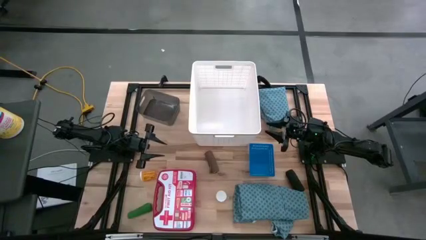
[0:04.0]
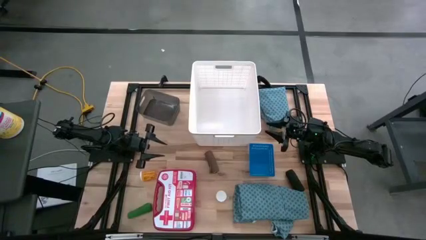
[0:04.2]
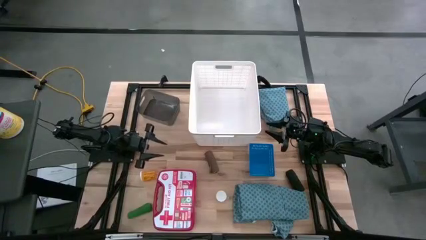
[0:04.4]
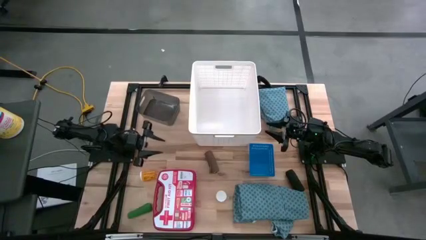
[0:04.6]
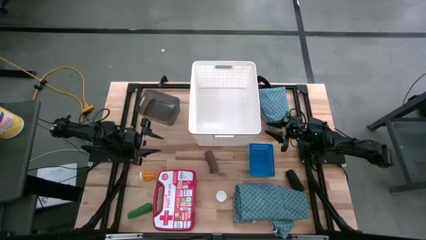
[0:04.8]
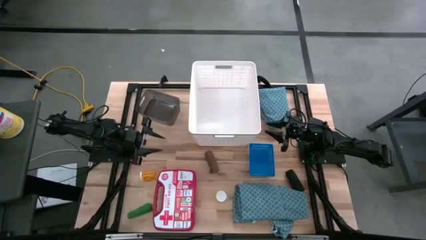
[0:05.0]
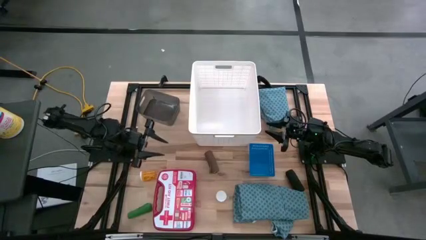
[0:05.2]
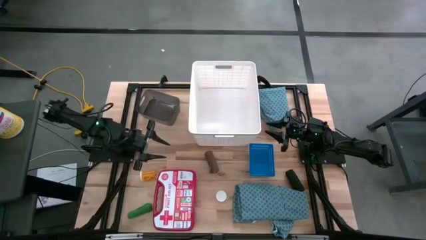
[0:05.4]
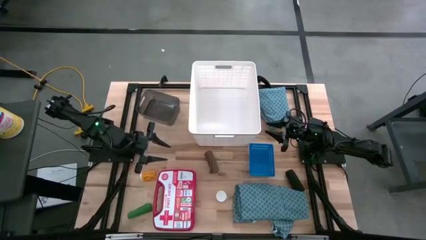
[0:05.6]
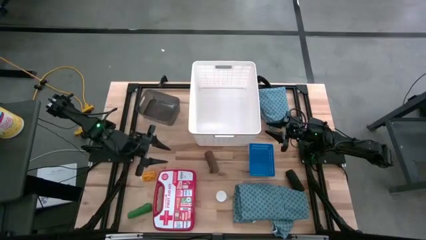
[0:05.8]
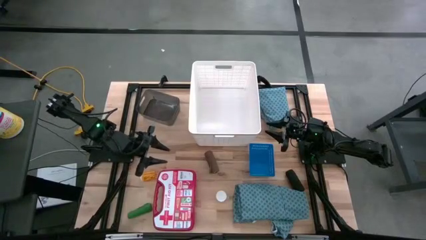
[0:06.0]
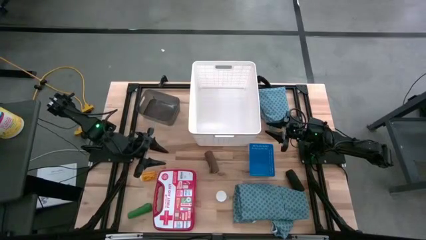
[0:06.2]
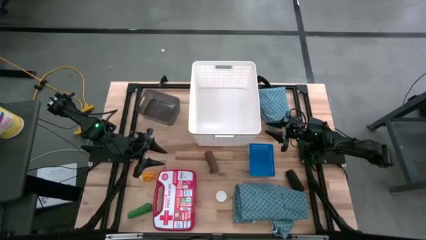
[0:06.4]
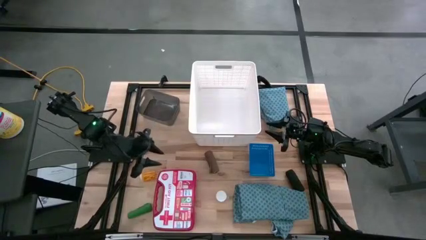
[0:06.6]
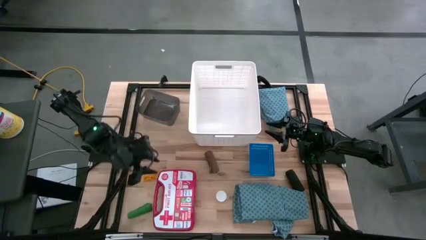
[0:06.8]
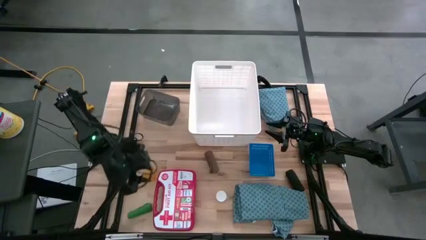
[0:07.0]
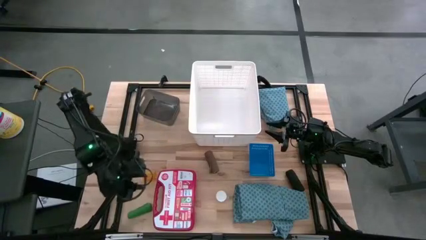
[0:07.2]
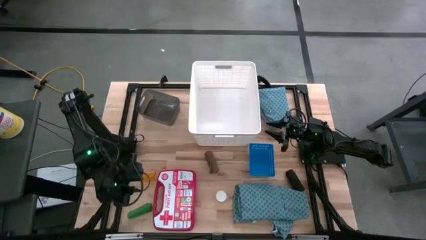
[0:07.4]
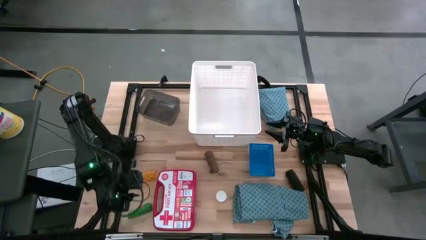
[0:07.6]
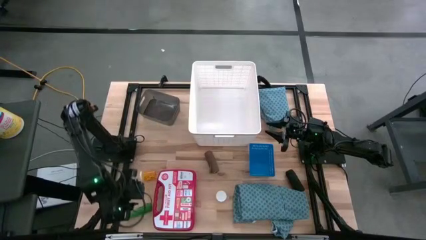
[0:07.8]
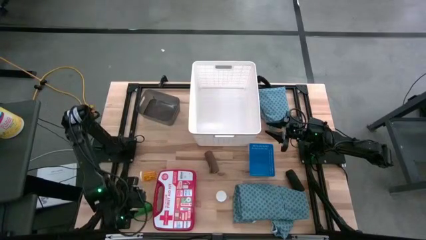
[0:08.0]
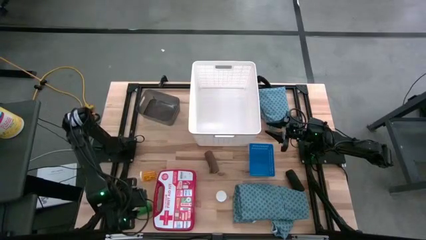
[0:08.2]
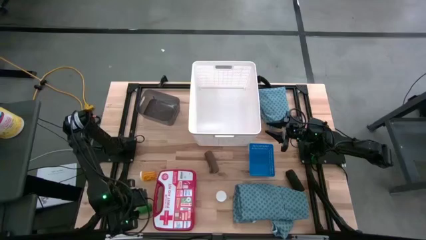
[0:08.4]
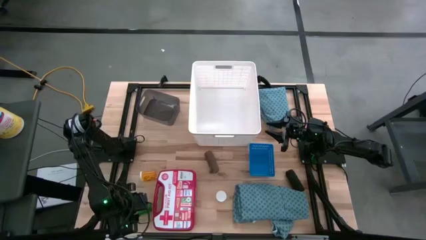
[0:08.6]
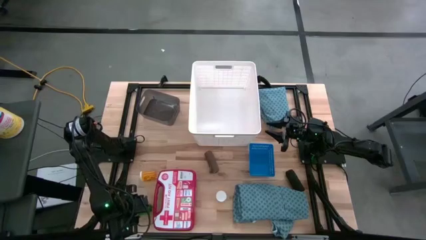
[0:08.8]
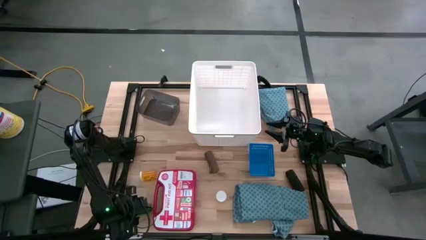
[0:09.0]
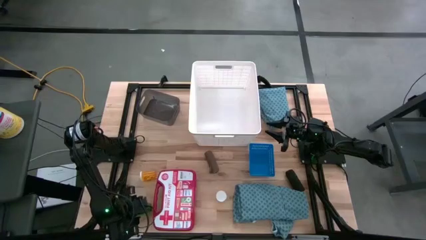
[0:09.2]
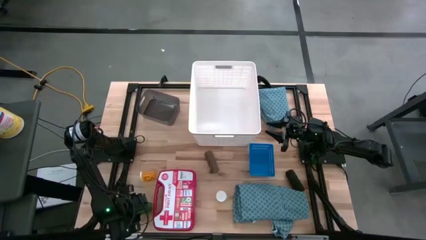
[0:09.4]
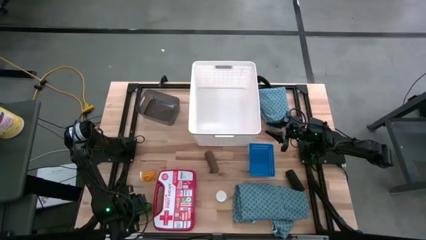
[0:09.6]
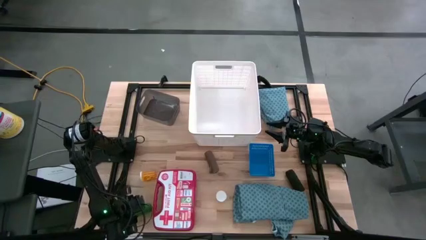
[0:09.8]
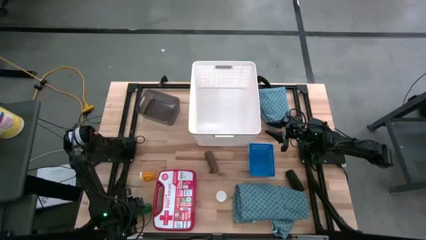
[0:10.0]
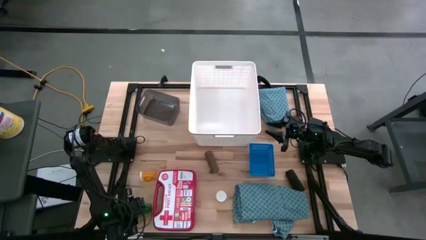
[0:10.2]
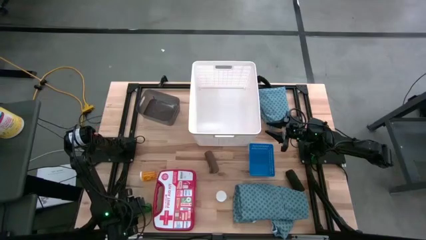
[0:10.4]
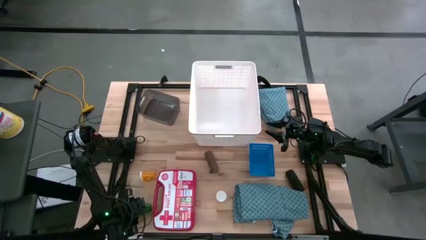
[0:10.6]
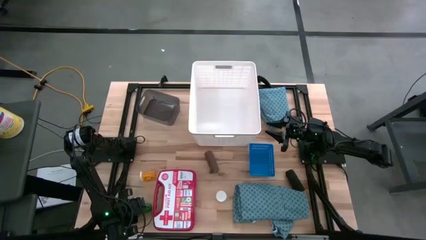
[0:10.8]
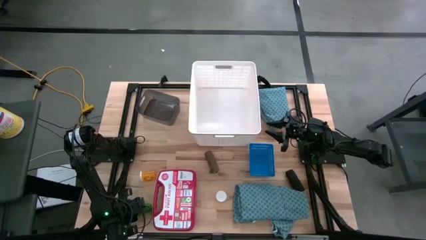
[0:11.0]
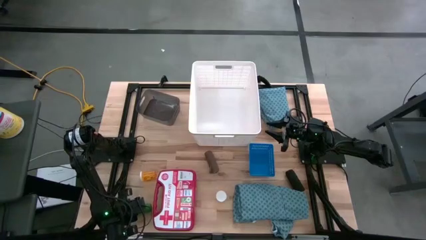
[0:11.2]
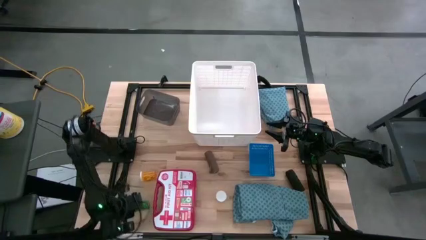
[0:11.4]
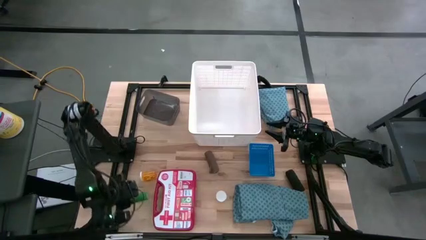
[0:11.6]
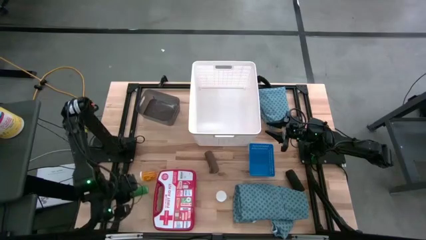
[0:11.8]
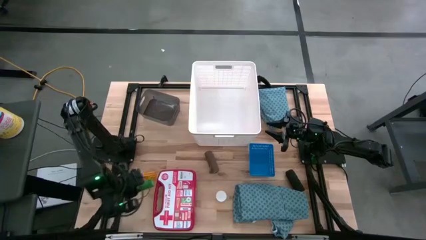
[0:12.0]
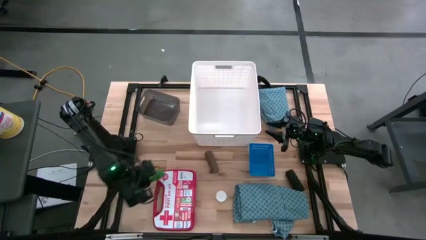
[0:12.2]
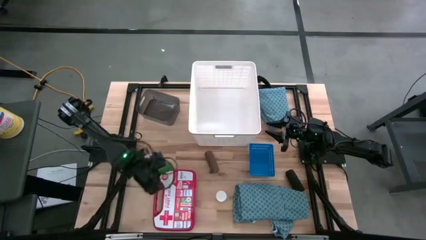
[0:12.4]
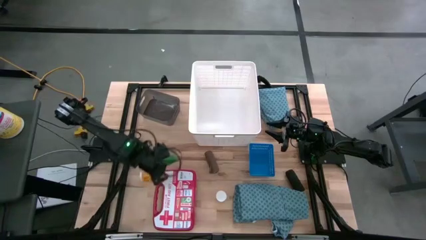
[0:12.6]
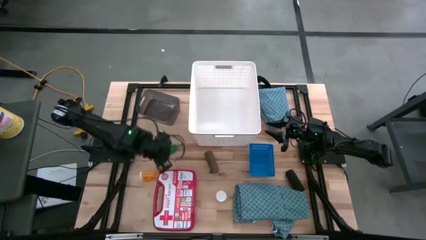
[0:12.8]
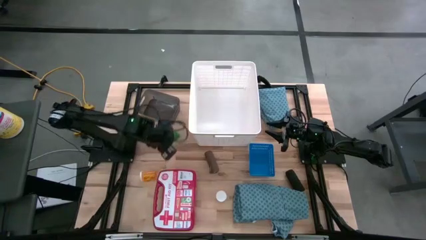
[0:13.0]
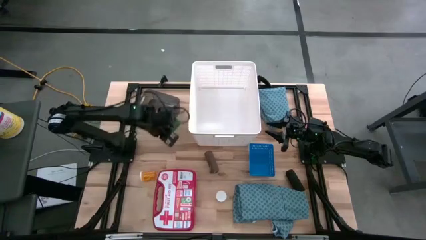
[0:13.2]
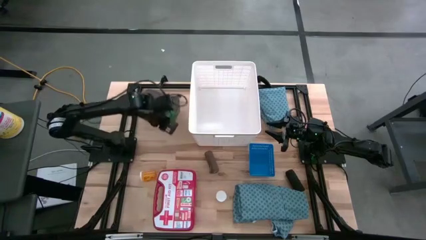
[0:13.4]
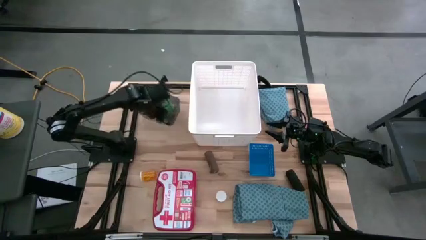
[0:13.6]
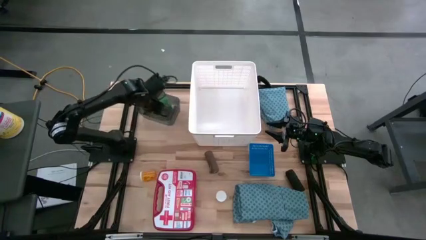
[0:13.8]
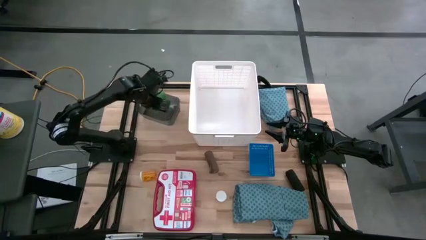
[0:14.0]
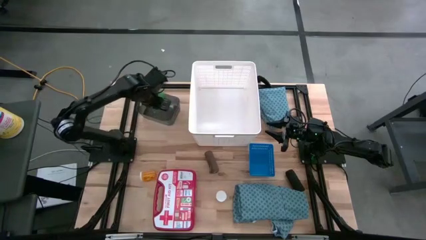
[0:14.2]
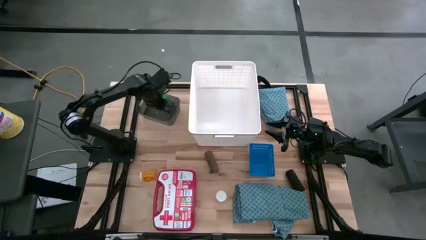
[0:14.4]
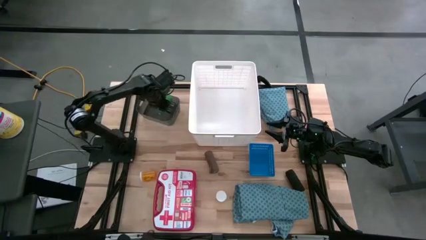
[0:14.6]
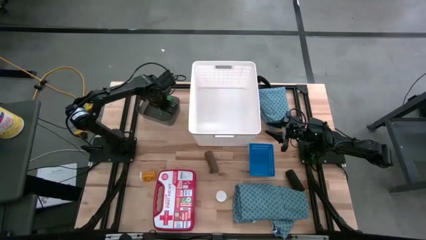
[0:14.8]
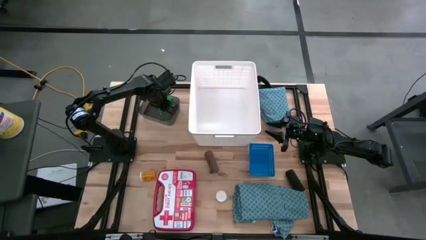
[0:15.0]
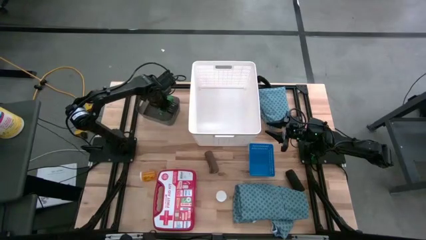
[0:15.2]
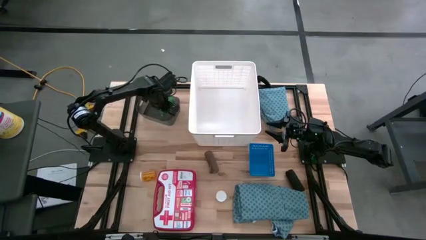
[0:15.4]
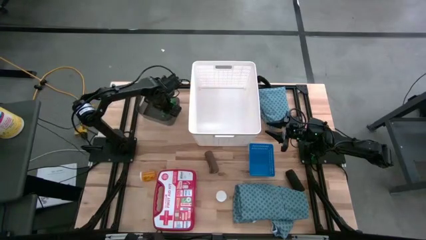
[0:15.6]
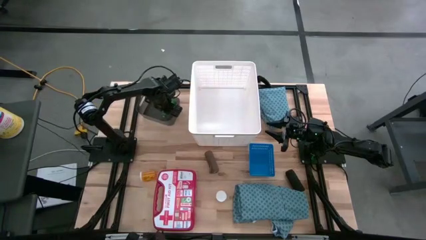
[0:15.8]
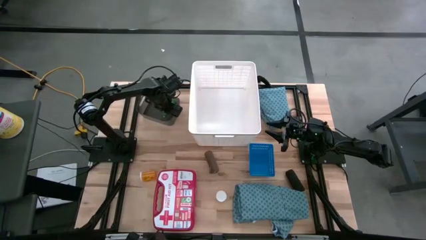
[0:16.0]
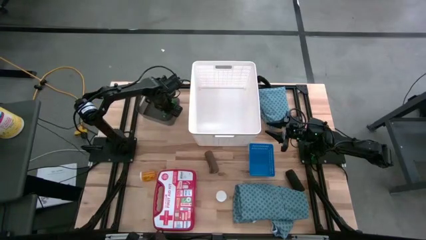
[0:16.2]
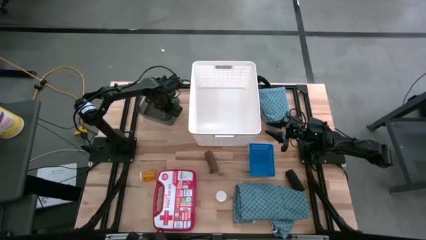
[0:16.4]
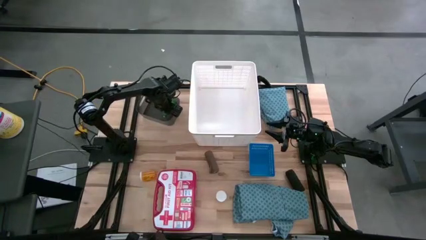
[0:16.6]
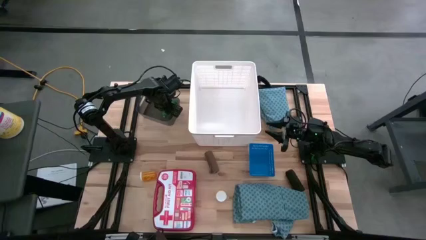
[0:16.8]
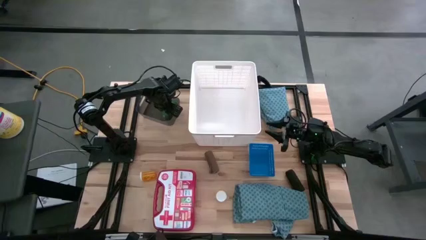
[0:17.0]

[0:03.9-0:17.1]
Task: Pick & place medical supplies in basket/bin
Put the green bandage into the black bin

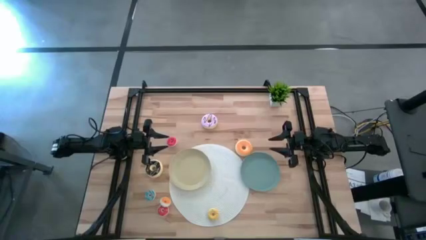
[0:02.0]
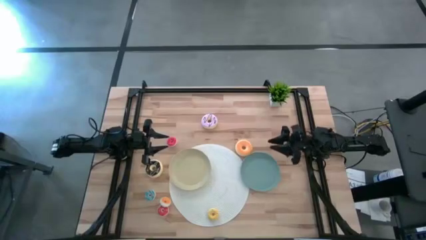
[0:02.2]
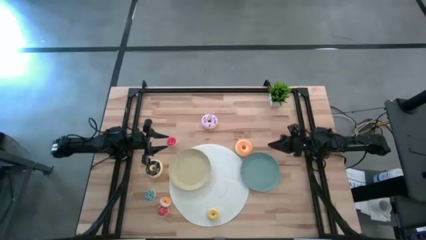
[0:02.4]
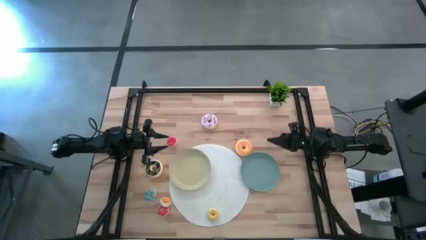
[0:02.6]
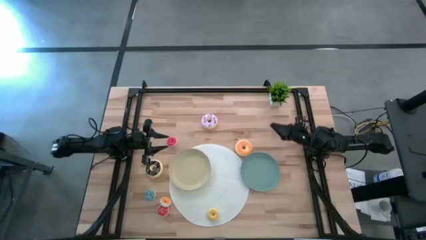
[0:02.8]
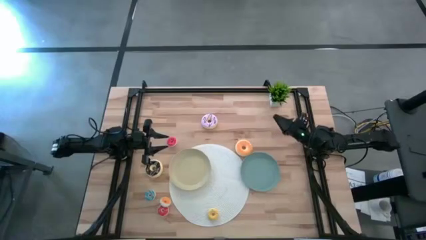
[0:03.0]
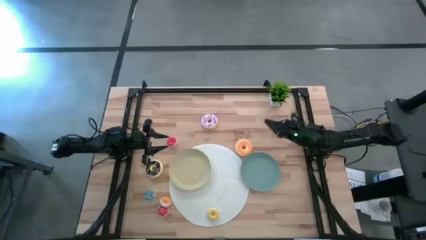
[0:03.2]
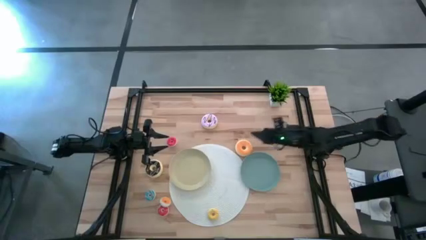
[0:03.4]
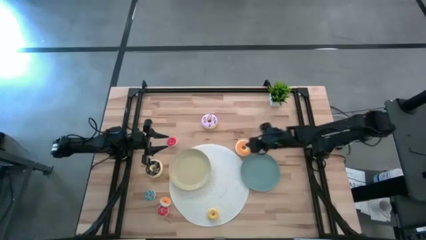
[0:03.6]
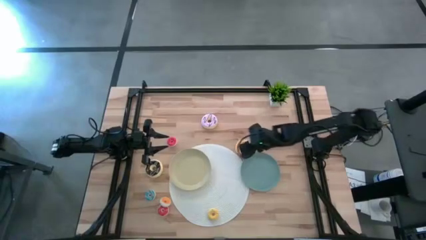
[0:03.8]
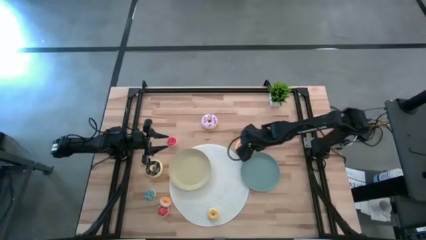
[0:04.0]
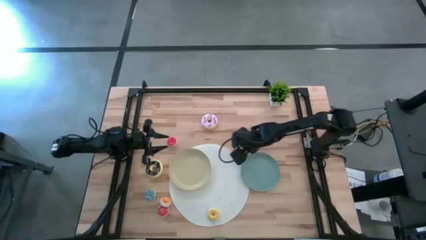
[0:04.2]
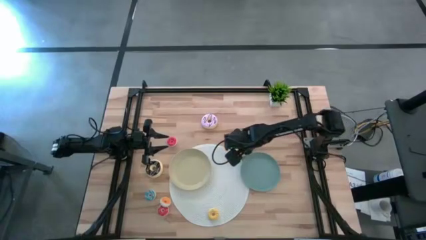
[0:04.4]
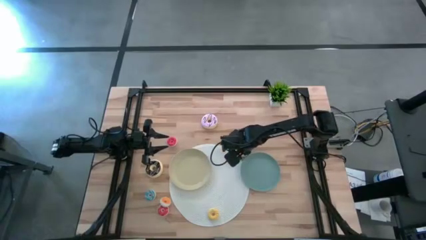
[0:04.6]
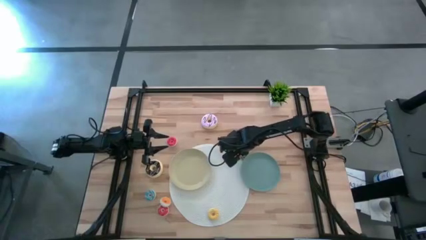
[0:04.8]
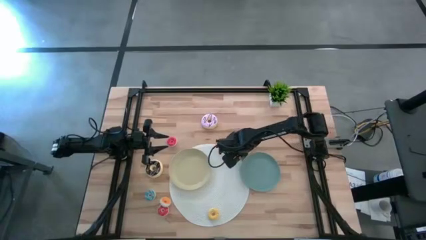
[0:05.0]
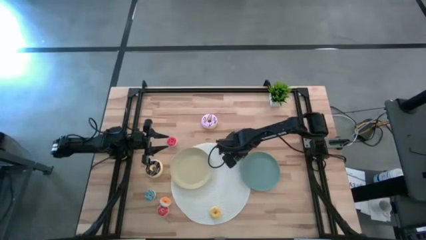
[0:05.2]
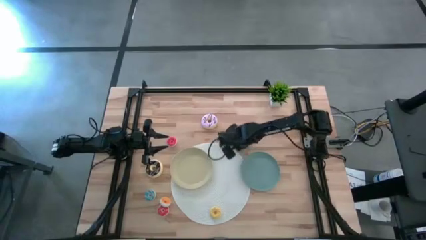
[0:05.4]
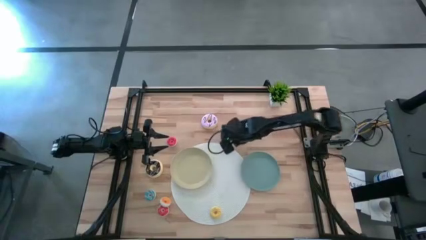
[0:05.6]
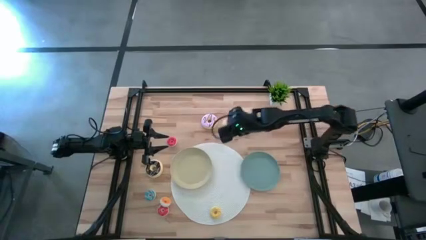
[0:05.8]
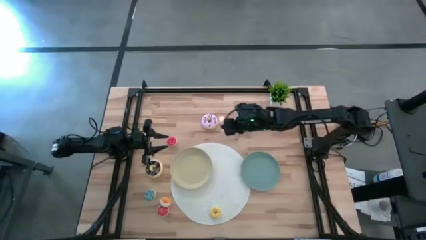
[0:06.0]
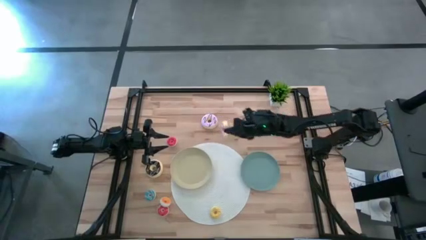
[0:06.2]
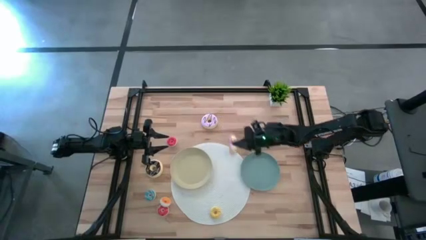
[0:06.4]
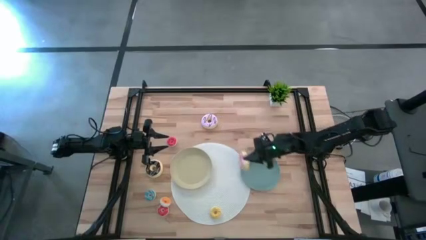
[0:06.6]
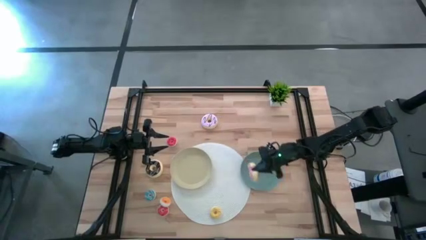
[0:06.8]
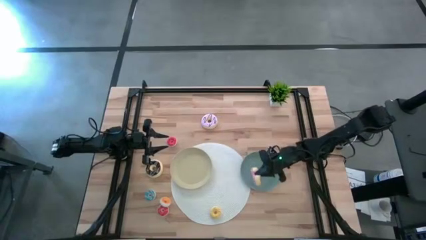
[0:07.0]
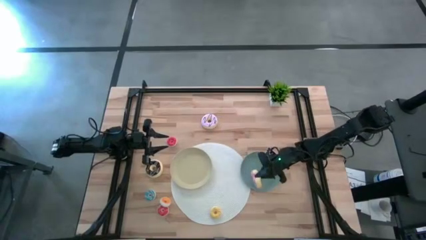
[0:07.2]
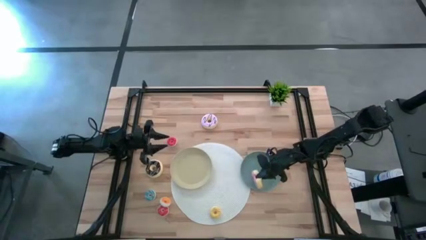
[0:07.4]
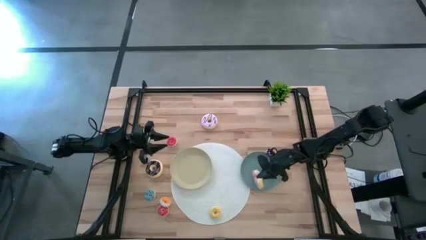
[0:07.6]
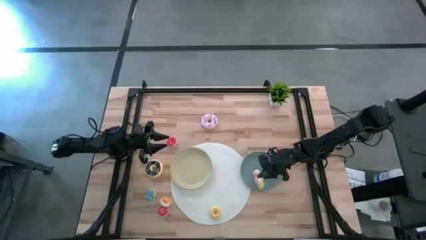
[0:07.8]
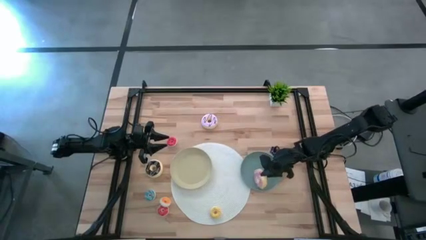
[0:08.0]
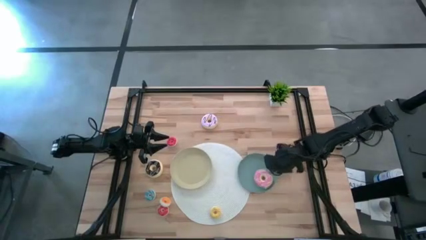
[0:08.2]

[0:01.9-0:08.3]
Task: Pick & Place donuts
Put the big pink donut on the blue plate
